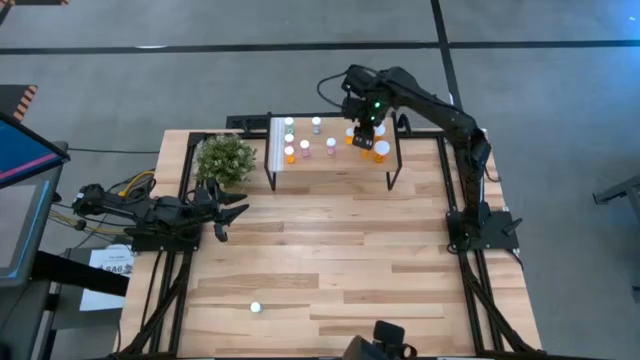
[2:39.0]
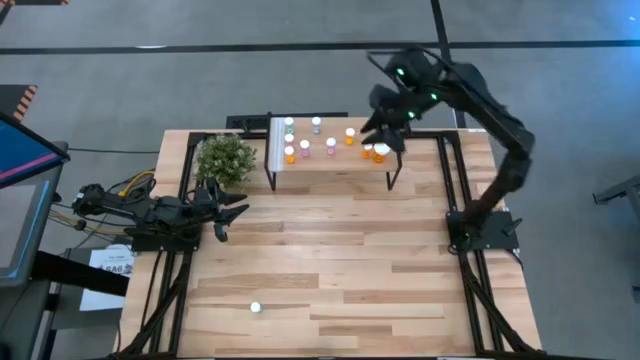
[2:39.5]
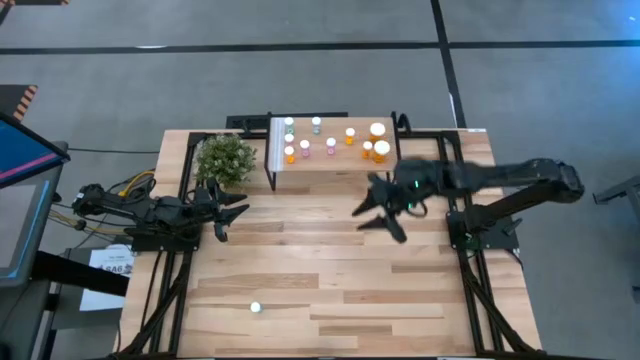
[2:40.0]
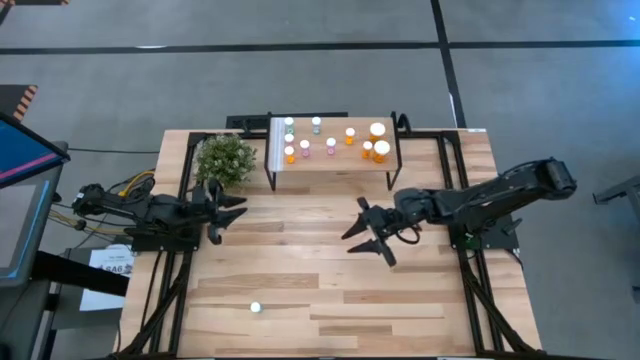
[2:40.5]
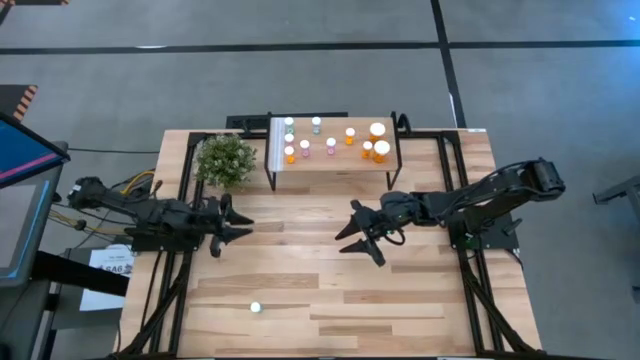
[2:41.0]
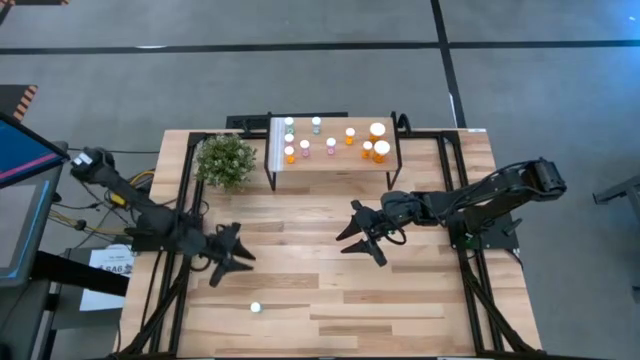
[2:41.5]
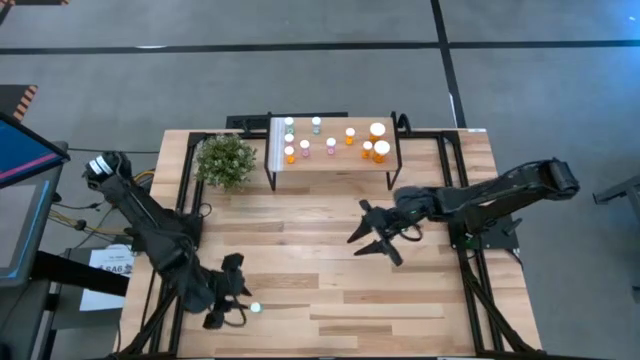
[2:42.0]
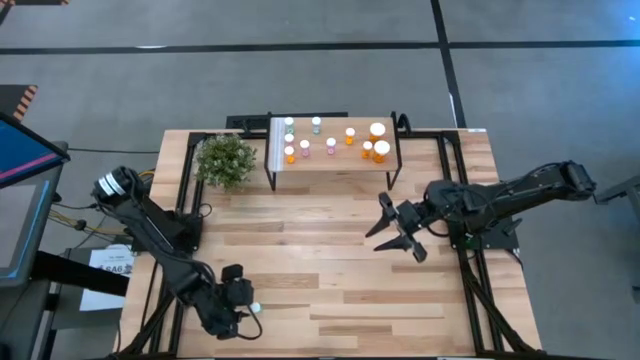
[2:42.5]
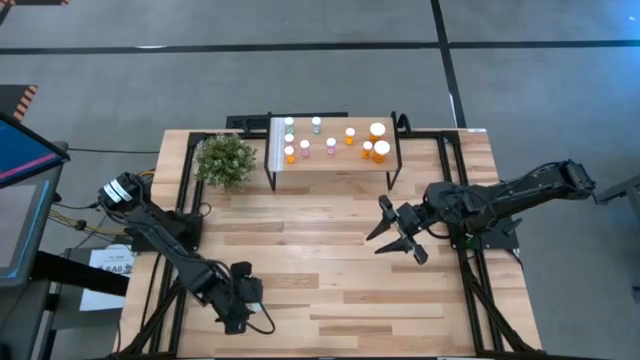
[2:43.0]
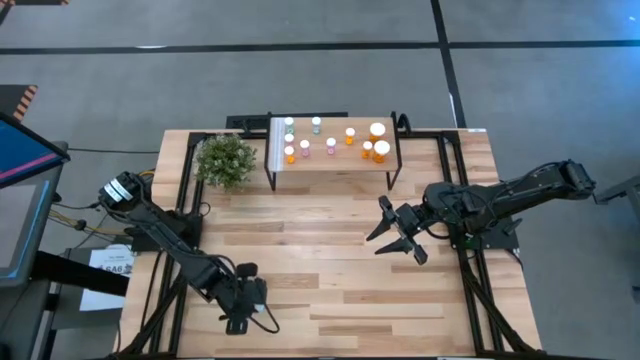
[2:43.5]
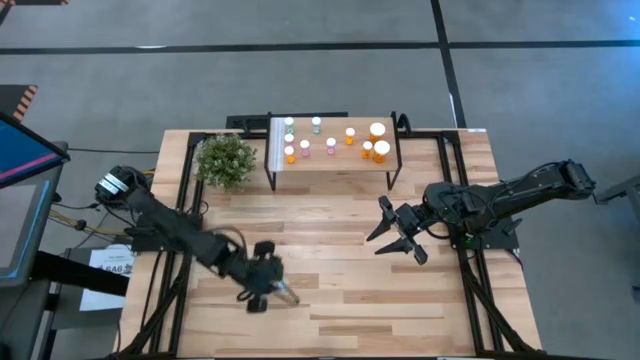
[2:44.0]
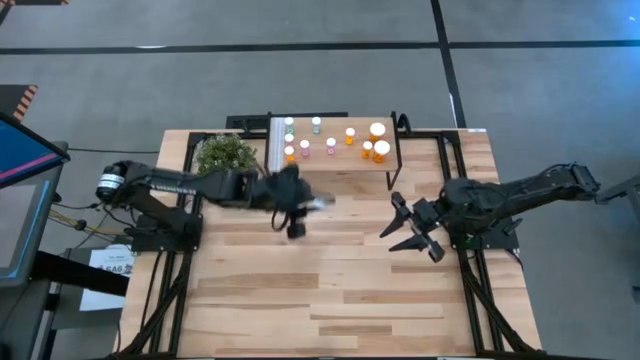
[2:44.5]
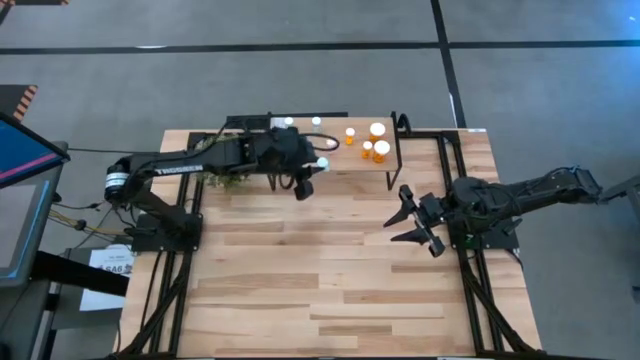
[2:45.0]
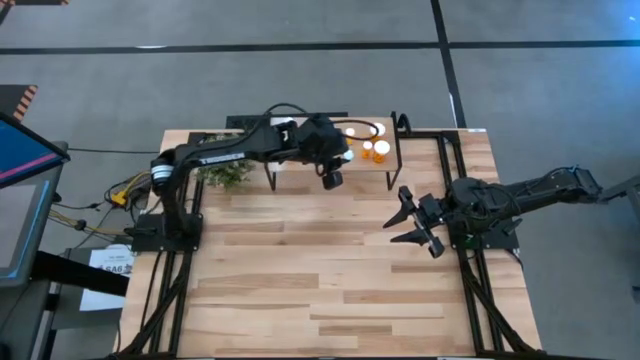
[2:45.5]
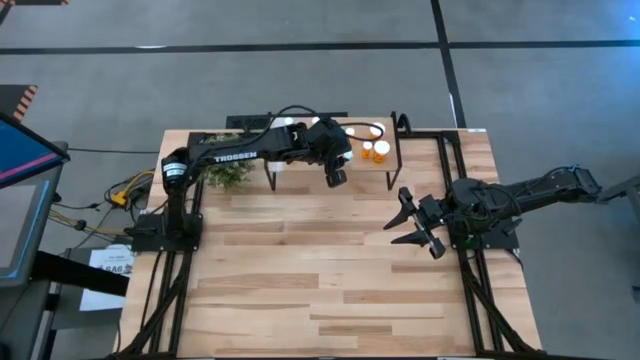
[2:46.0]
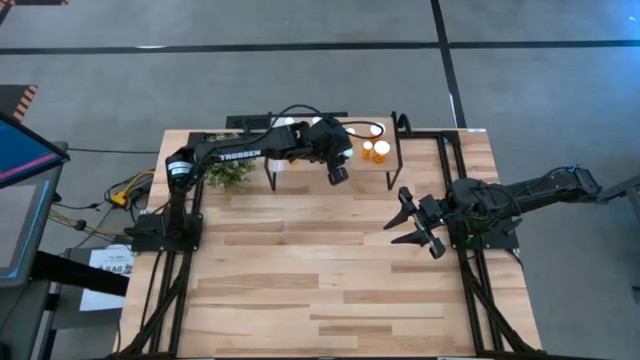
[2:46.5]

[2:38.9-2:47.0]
Task: Pick and place medicine bottles onto shelf by color
Put the blue small pill bottle on the shelf

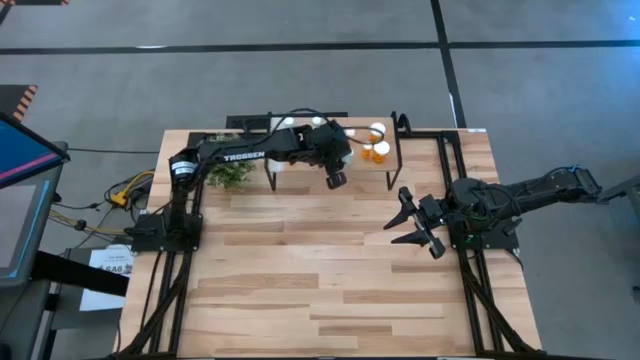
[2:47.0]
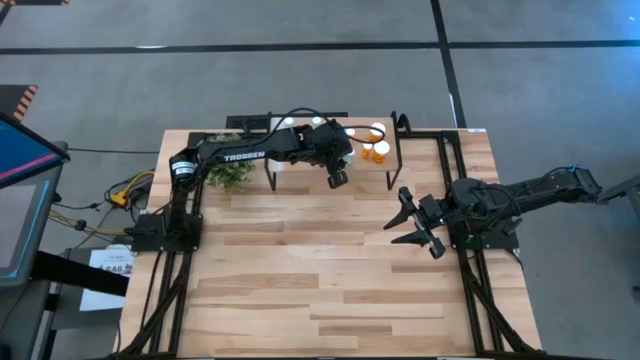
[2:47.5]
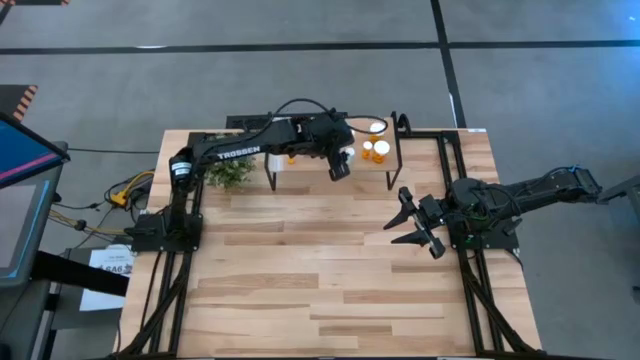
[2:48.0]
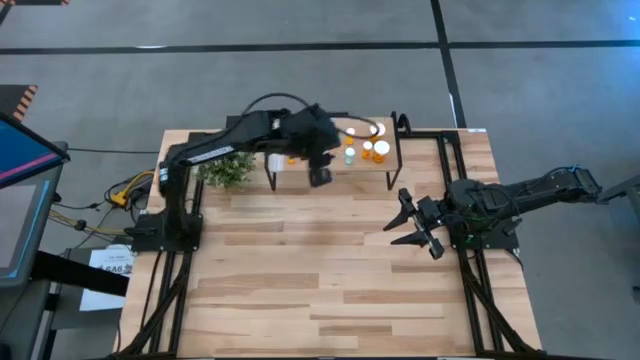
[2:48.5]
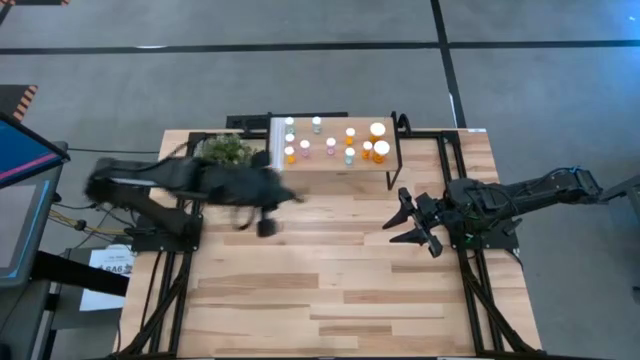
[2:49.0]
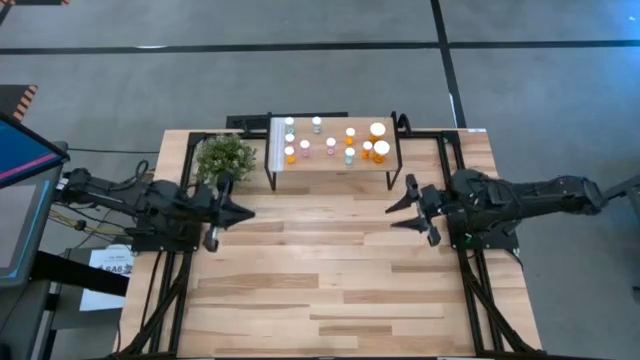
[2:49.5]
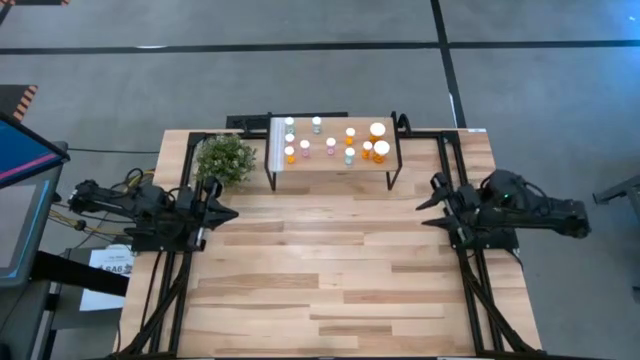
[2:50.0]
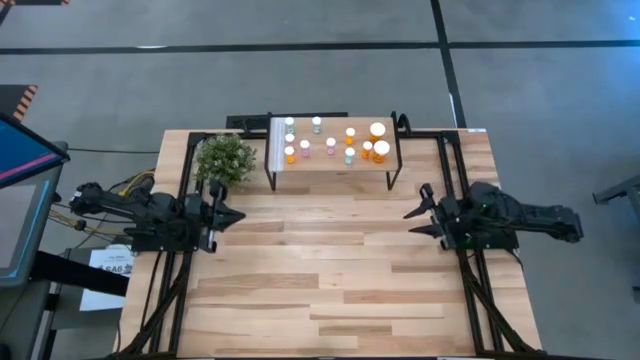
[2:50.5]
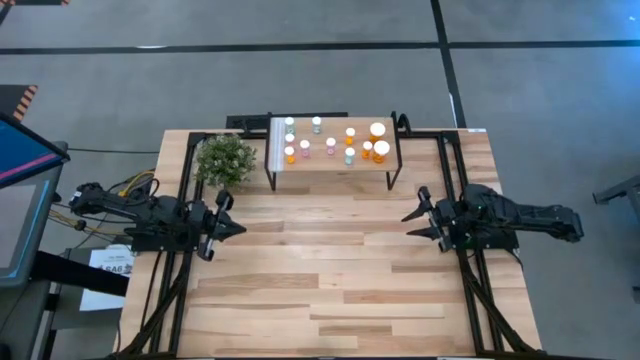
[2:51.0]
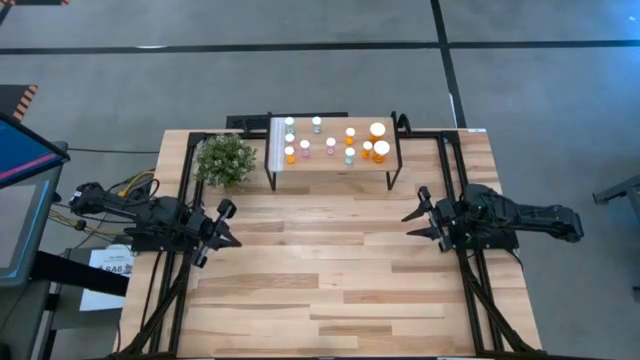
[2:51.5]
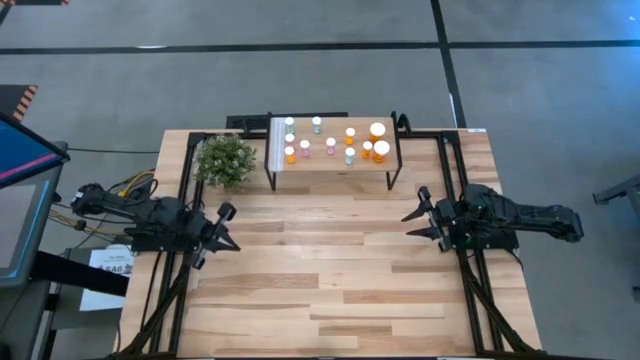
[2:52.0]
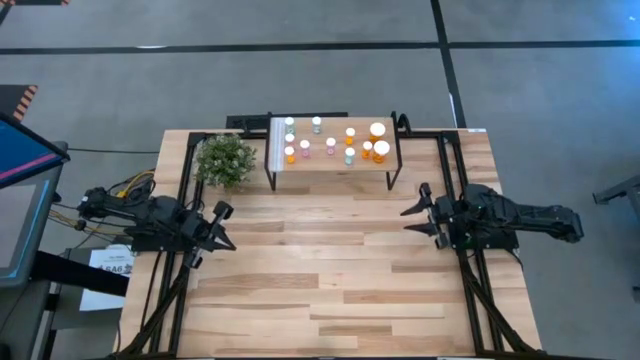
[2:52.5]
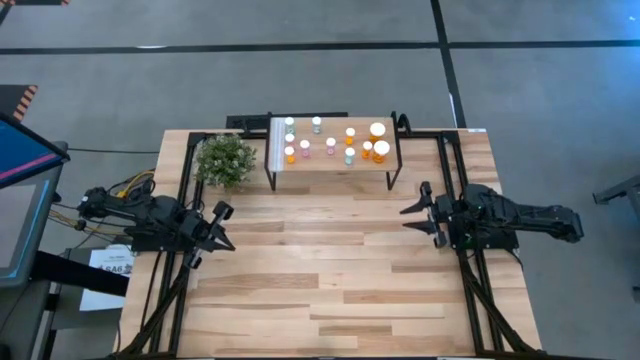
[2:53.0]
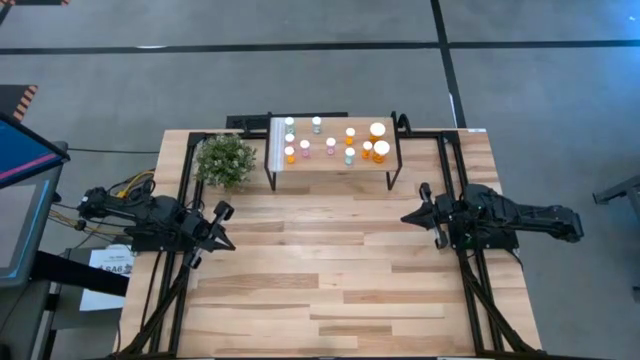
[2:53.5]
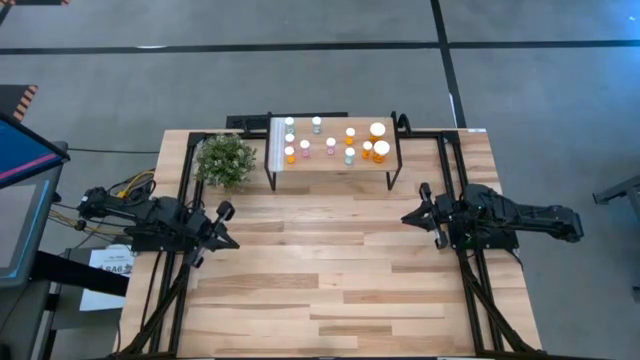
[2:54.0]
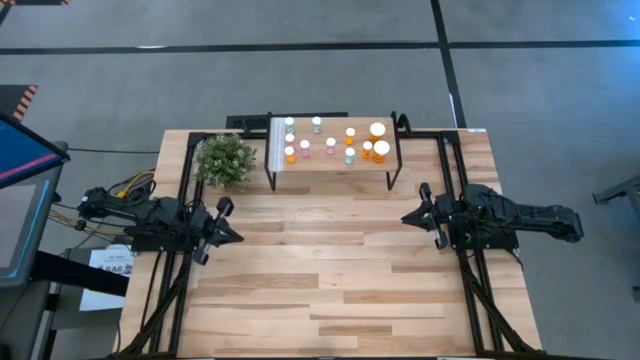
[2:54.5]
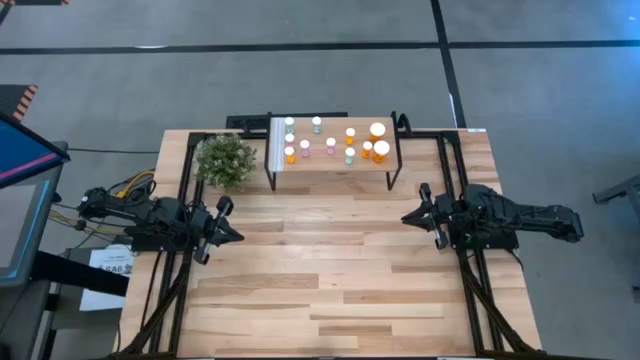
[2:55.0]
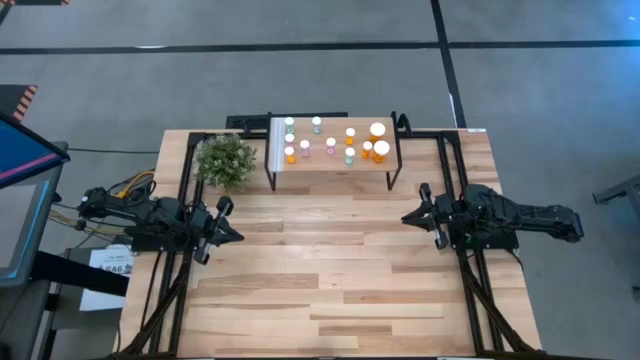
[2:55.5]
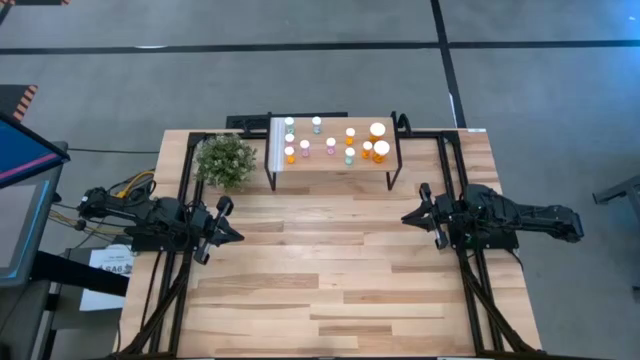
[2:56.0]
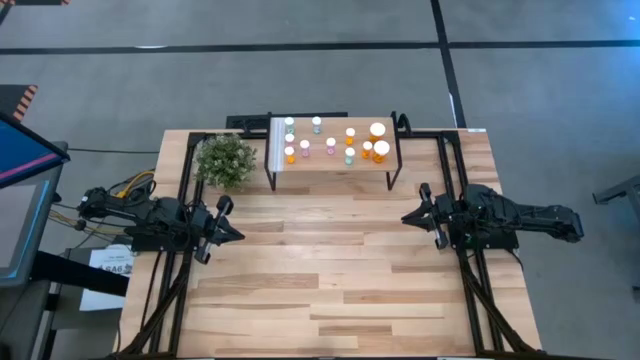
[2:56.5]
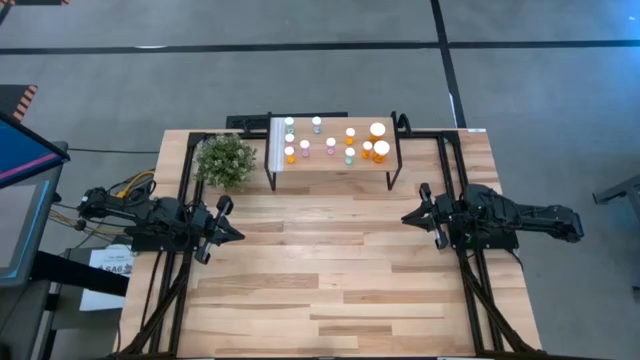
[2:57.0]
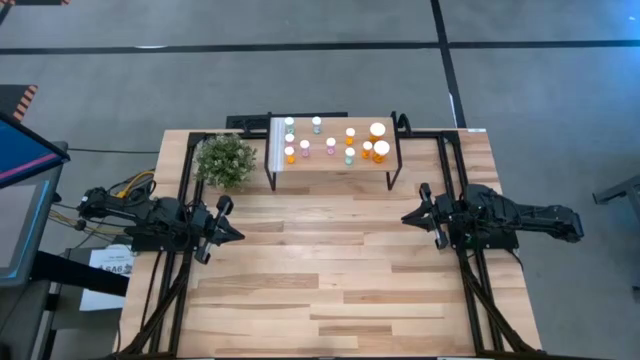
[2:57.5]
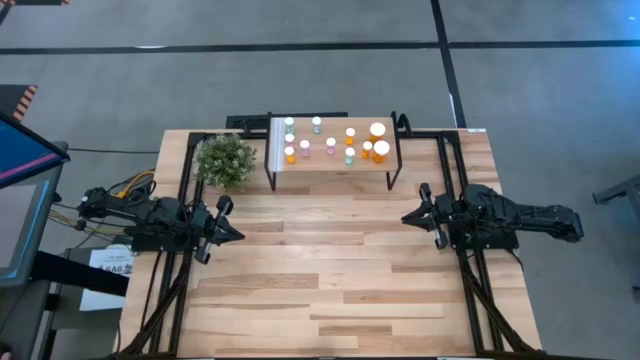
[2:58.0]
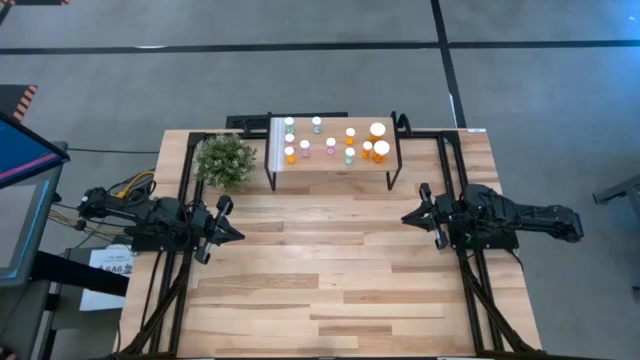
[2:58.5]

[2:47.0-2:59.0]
Return to Home Position

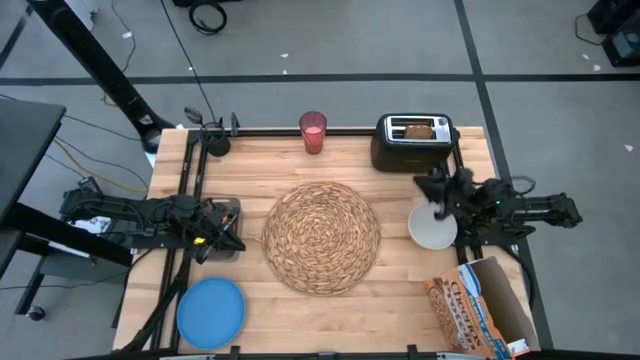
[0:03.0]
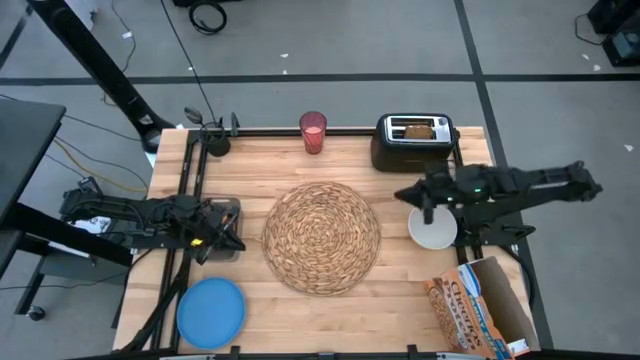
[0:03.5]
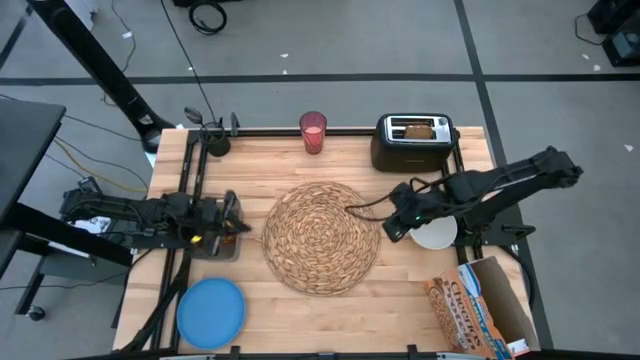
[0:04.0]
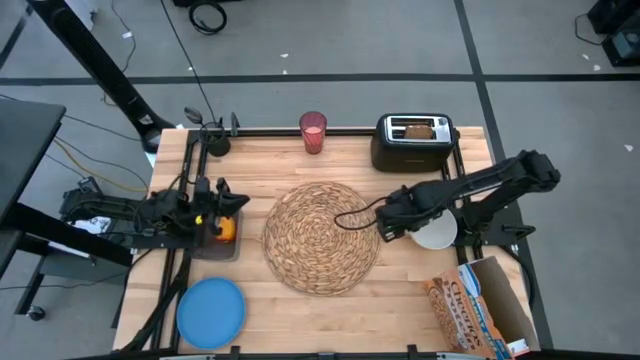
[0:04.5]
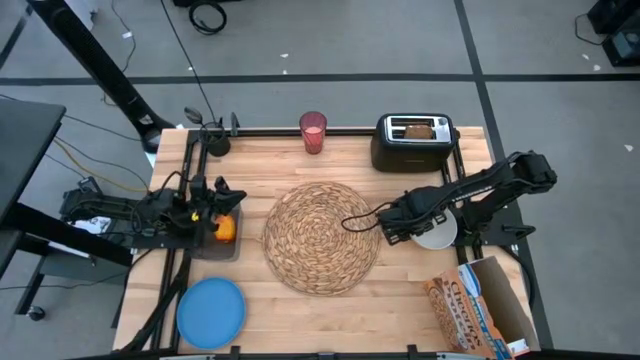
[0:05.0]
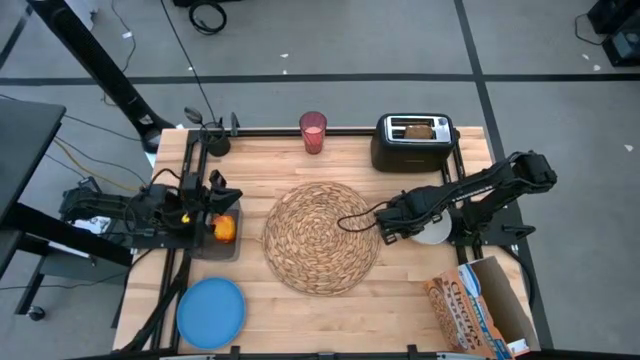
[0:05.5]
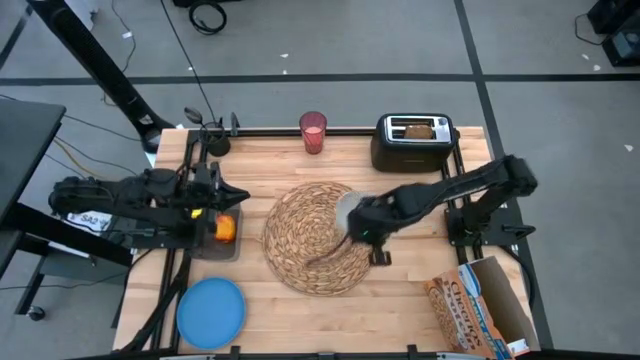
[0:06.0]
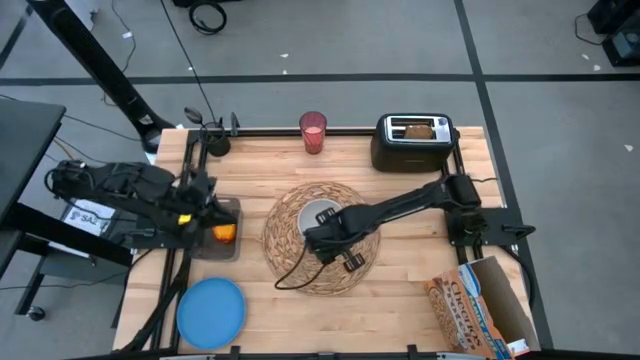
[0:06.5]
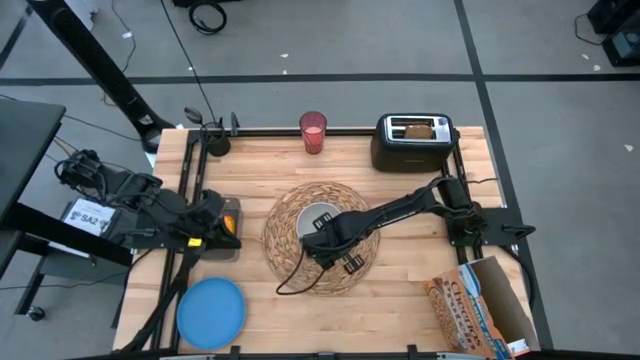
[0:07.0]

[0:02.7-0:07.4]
Task: Arrange a breakfast setting
Put the white bowl on the brown table mat
